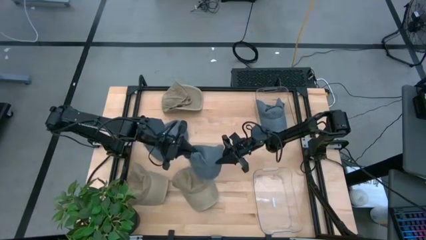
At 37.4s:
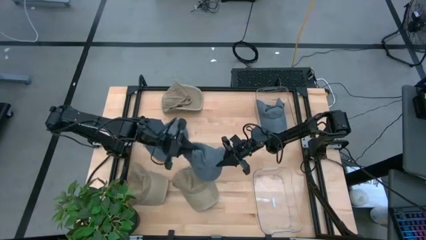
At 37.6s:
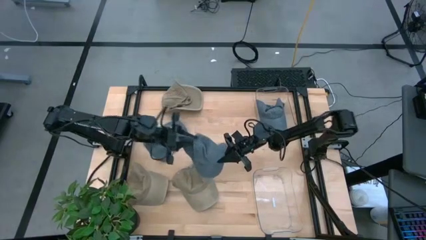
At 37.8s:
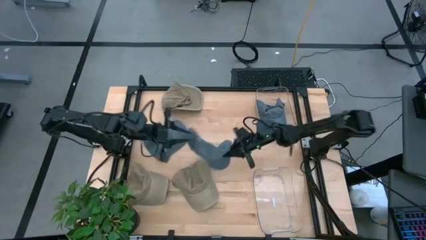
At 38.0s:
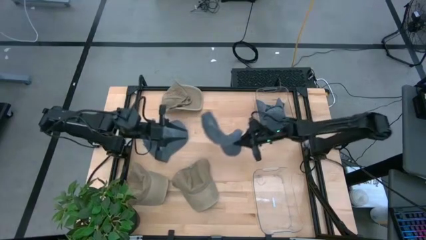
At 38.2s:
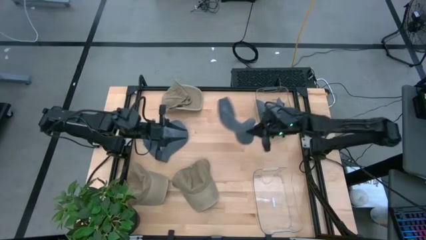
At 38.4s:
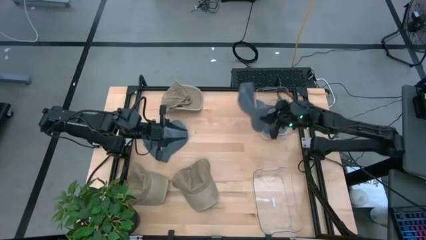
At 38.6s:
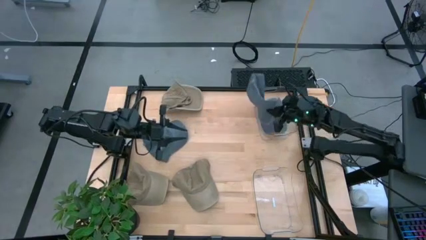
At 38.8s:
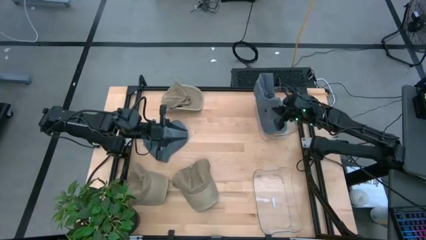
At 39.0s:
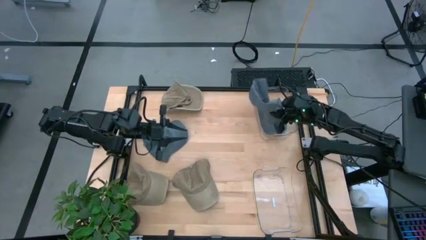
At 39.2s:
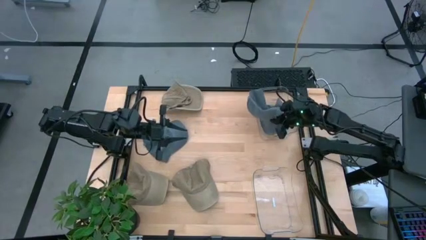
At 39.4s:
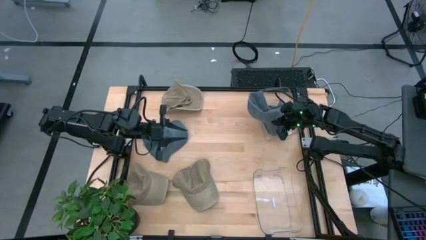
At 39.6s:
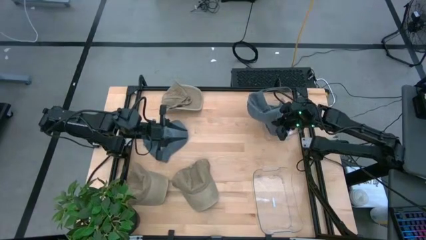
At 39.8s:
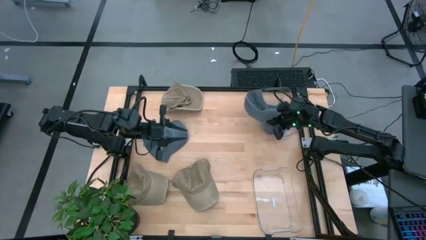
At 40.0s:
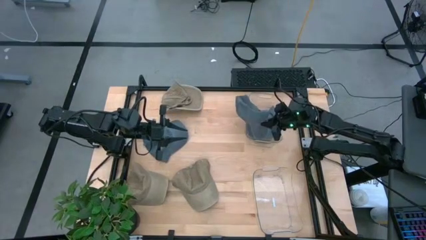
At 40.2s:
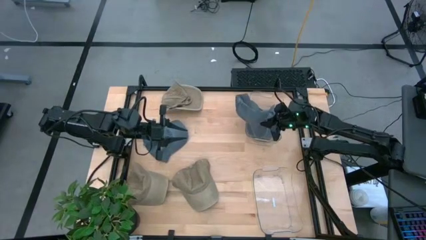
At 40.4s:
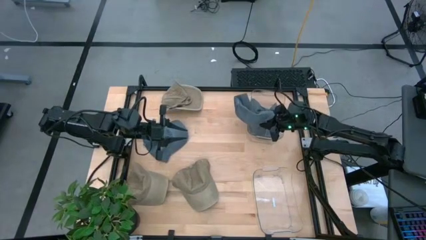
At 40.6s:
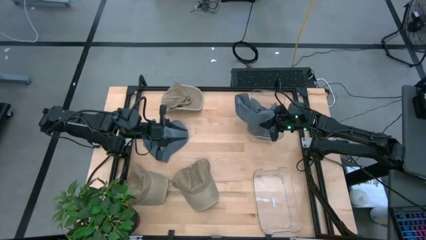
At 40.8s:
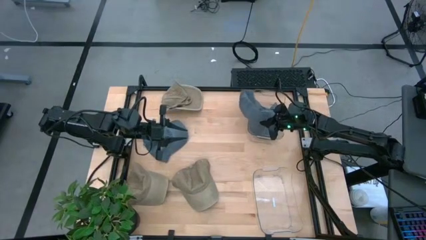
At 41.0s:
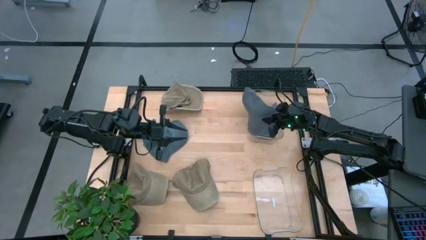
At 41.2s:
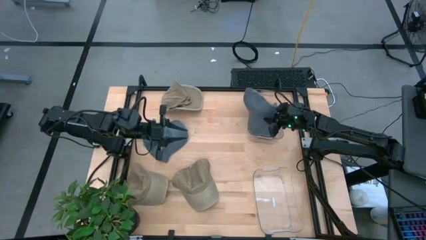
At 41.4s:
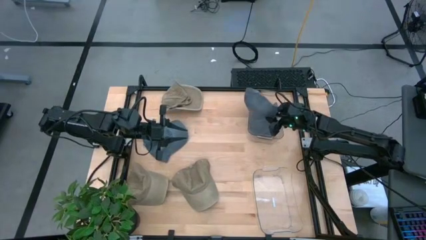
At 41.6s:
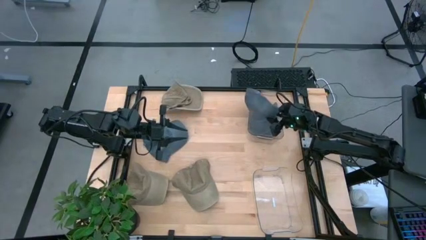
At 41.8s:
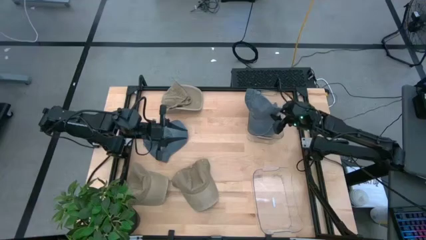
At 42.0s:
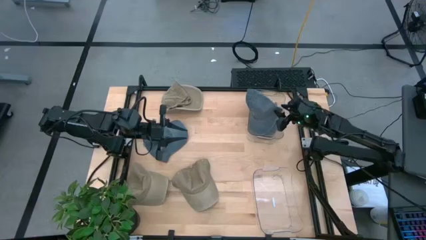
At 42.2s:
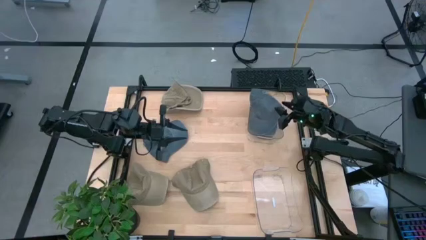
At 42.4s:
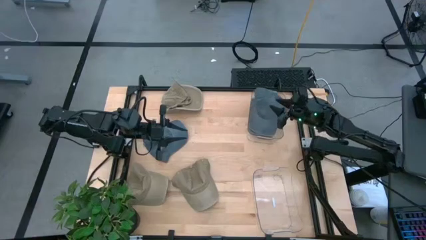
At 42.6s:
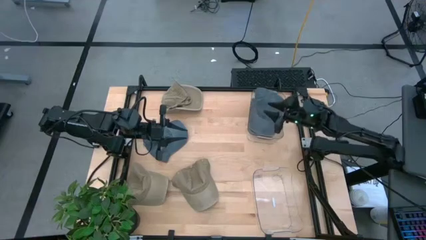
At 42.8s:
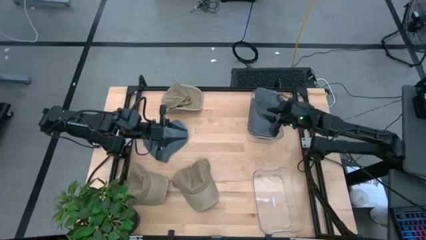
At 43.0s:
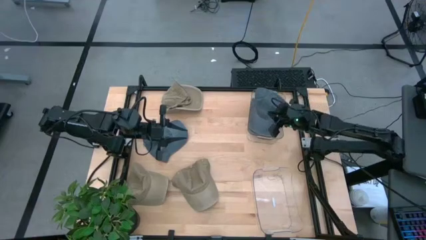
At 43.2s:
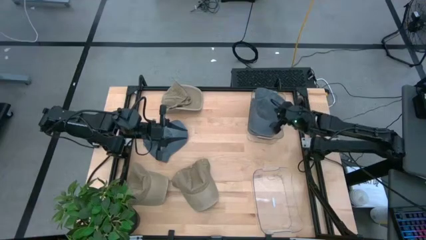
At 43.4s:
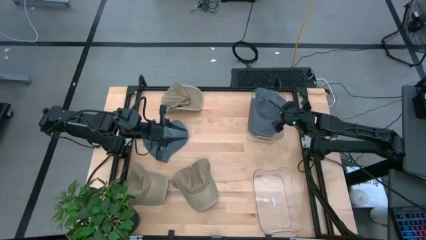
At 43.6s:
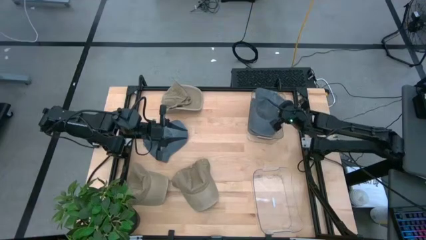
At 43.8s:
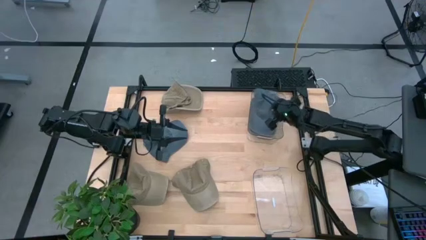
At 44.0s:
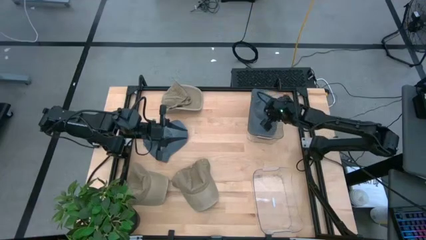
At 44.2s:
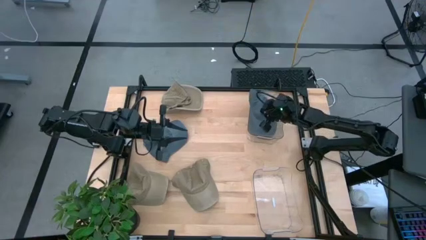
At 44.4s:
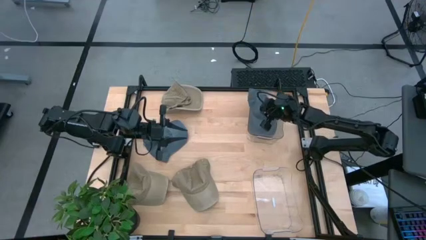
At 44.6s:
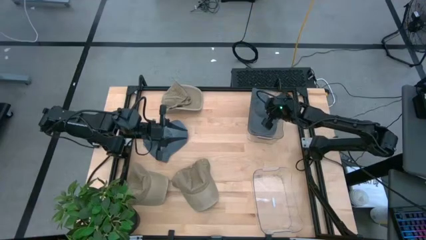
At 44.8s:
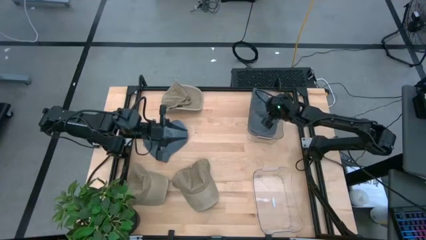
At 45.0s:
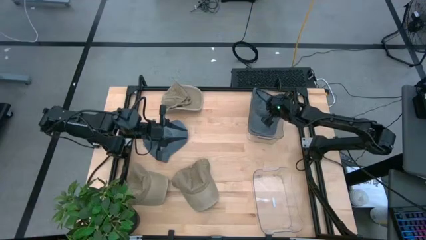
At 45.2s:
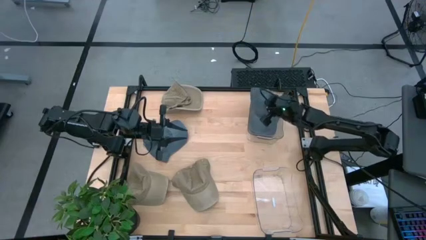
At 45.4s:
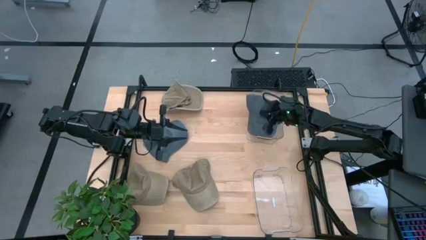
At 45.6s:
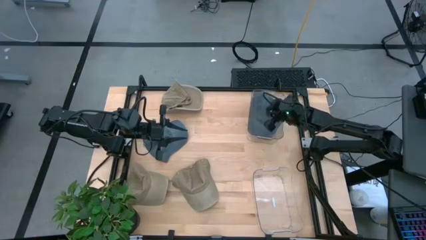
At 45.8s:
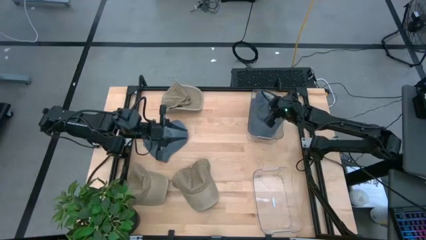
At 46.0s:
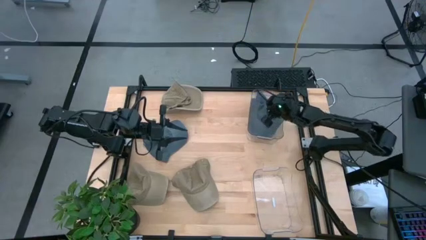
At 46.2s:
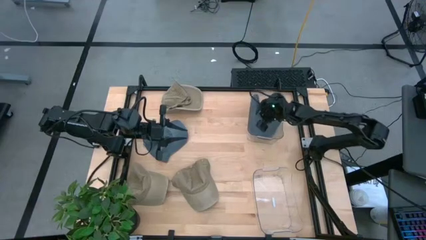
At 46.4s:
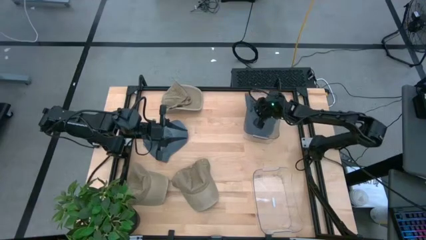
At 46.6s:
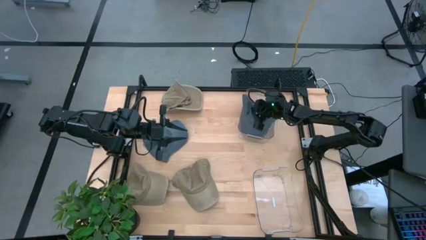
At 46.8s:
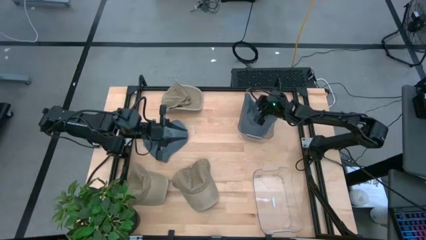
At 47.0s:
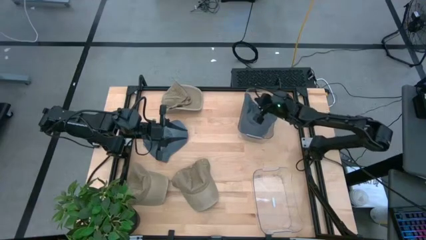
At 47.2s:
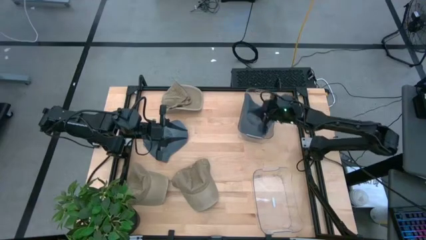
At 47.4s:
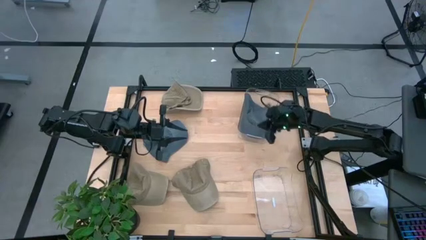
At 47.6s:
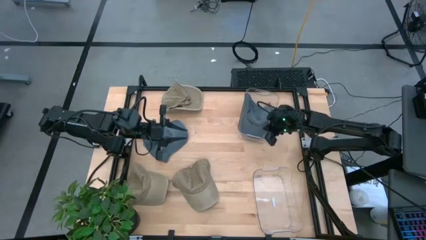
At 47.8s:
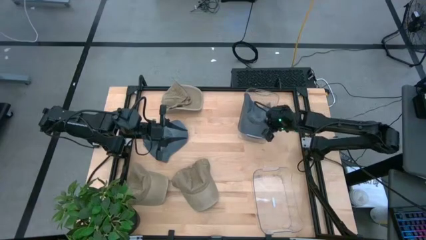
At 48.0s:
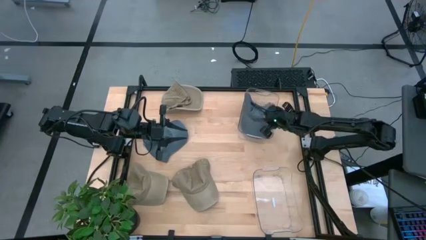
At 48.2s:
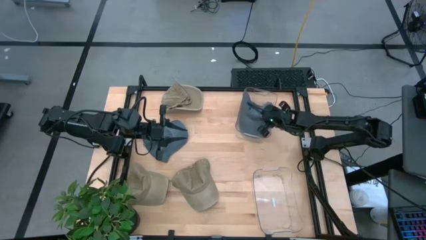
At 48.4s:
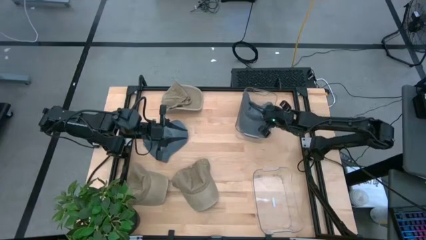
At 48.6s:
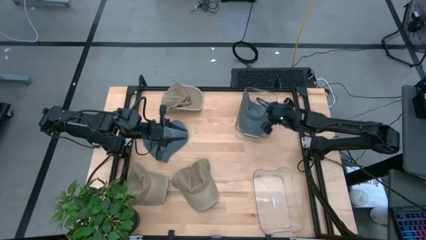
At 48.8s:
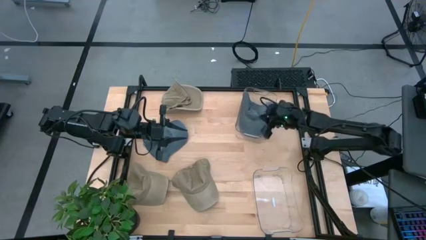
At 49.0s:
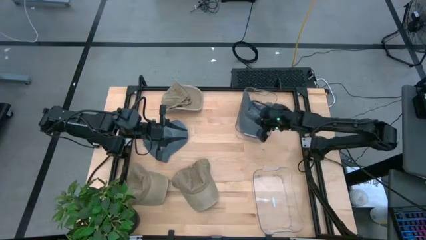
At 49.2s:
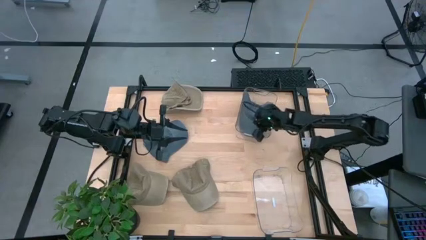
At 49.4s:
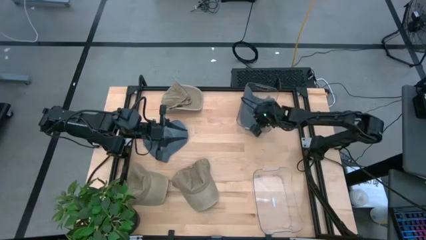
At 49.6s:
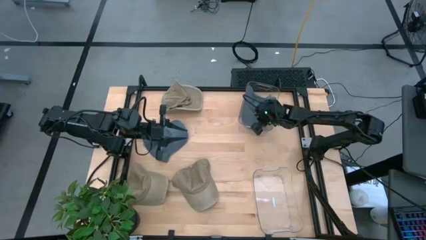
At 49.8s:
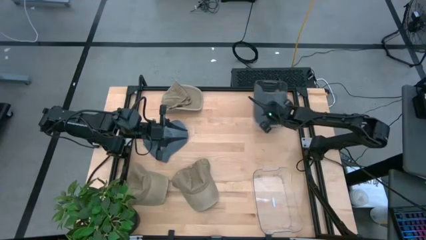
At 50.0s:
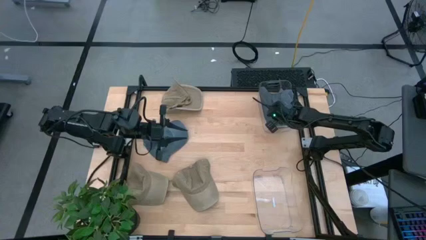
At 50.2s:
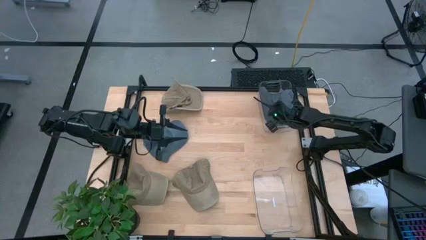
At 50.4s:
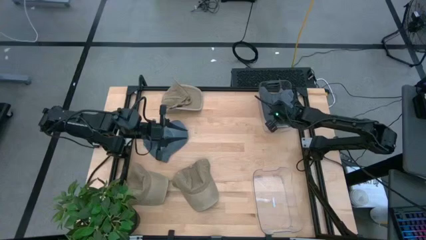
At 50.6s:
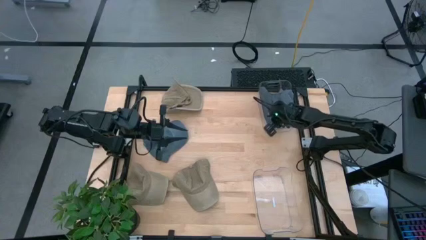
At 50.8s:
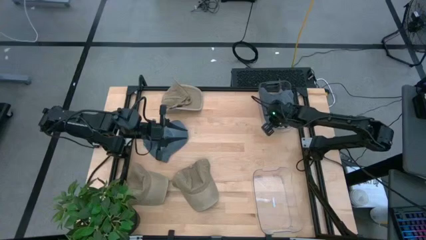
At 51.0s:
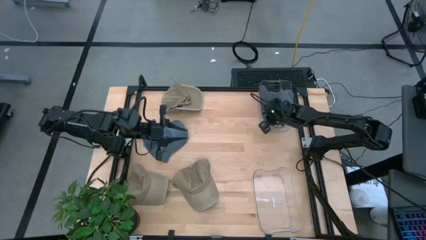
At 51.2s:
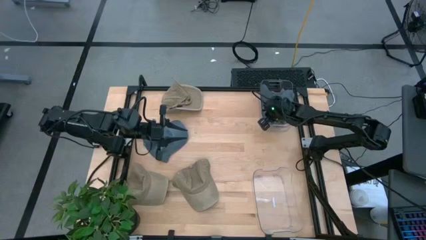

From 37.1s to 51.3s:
Task: Pick & Place hat
Put the right blue cap into the top transparent bin

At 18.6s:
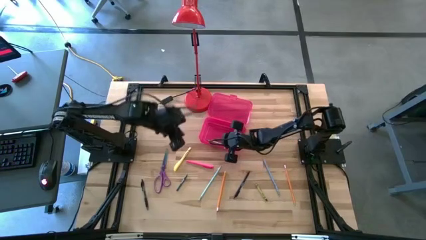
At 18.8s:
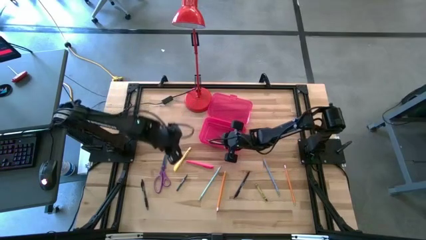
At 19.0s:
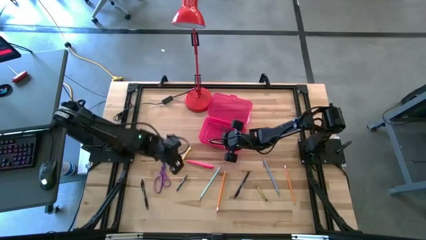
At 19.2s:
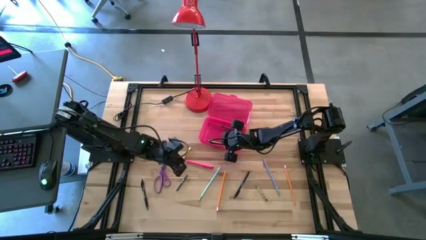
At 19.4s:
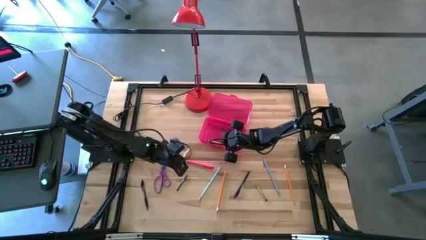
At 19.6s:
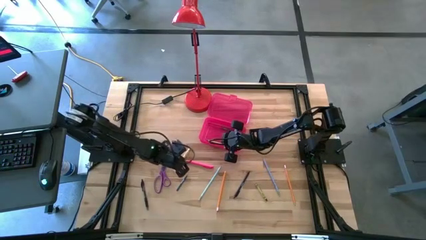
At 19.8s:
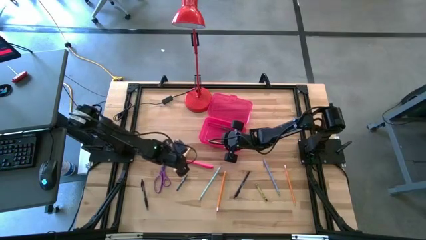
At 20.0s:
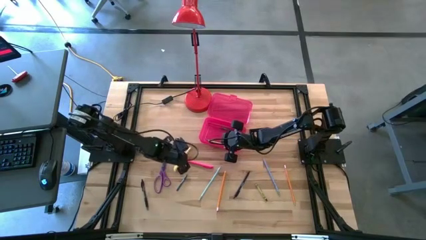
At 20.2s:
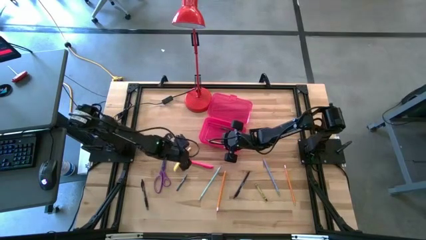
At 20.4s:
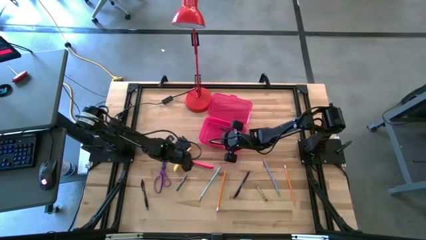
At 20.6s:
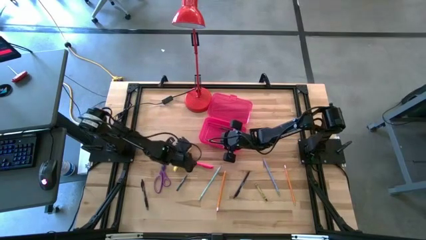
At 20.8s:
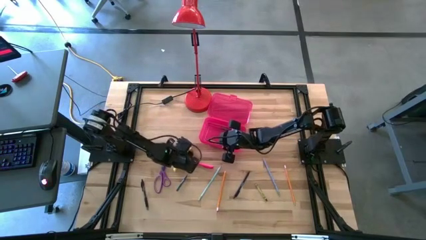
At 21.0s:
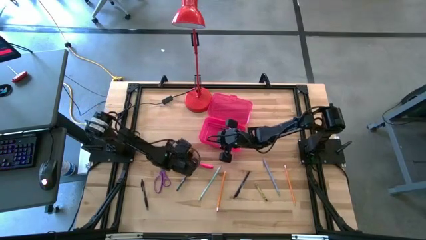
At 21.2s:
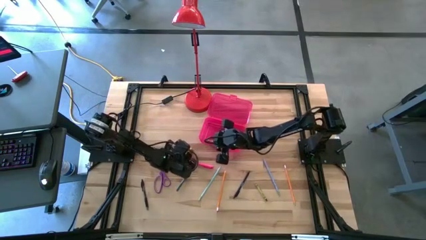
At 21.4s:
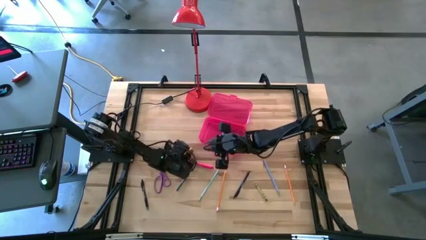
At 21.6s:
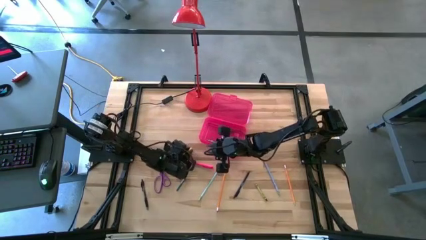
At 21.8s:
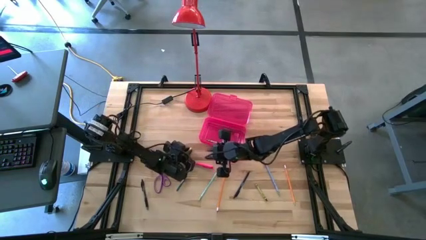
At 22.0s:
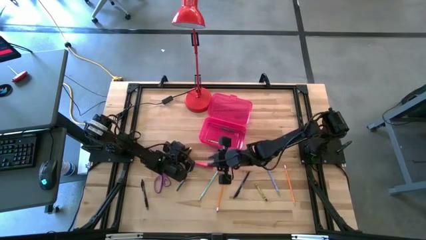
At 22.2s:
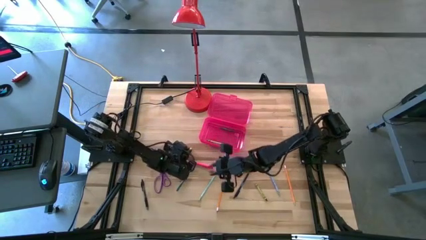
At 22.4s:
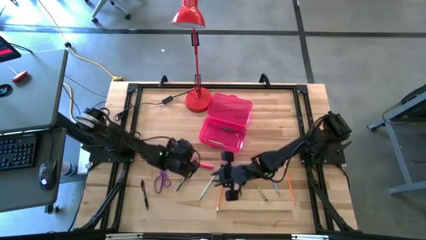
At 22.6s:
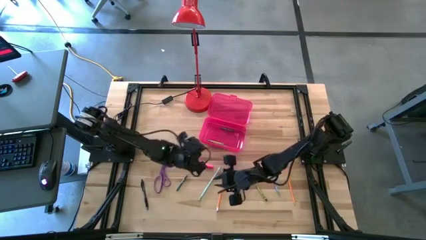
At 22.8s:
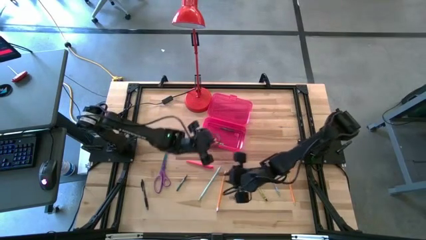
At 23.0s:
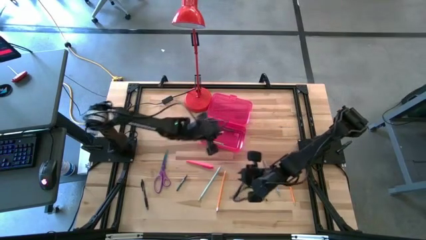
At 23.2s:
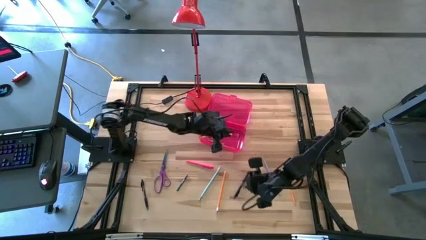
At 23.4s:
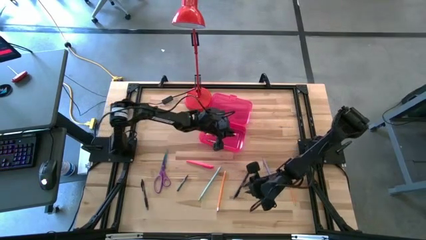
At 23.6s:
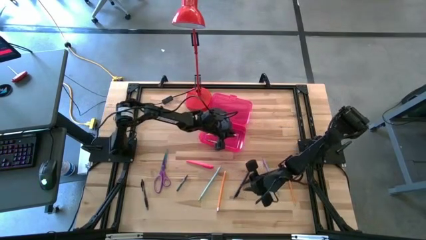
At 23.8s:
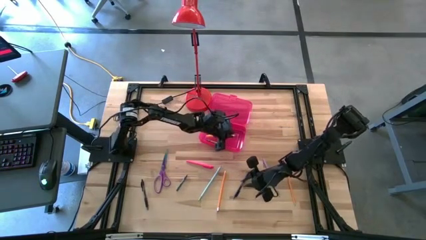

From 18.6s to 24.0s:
Task: Pick & place school supplies into a supply box
Put the yellow pen into the pink supply box
